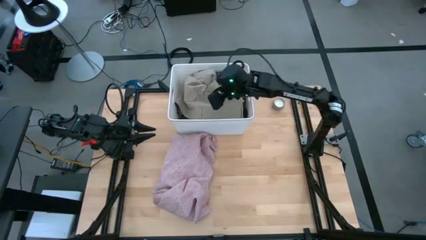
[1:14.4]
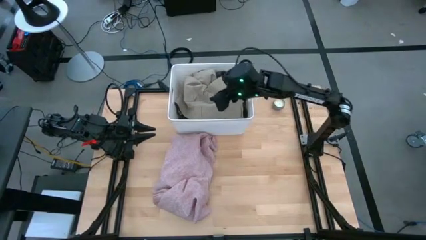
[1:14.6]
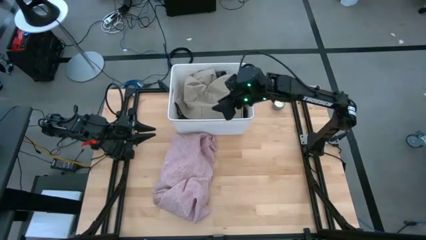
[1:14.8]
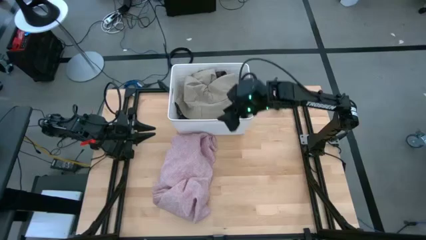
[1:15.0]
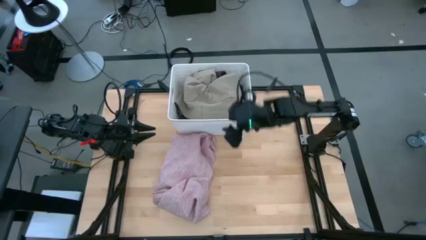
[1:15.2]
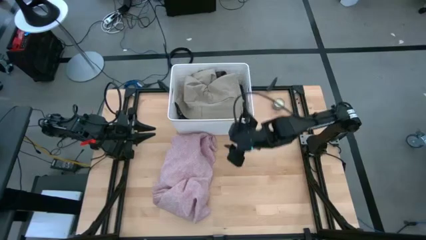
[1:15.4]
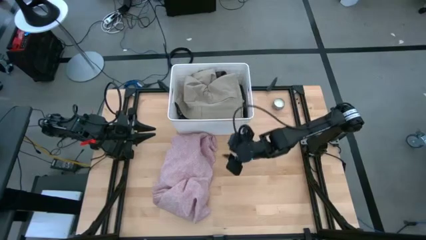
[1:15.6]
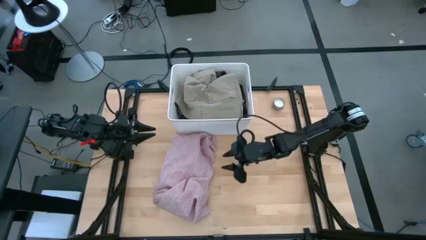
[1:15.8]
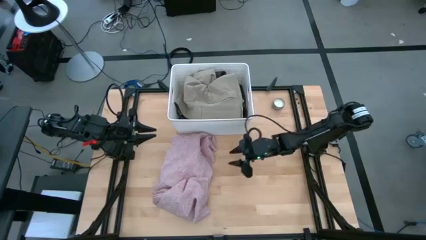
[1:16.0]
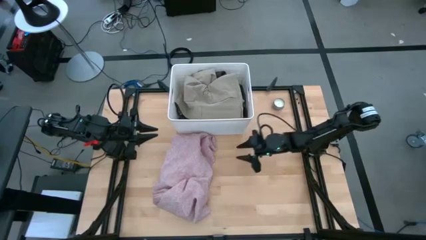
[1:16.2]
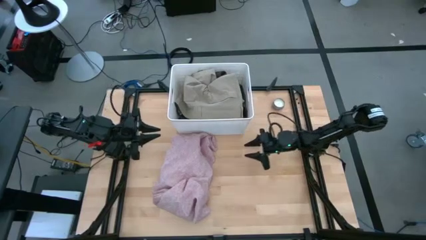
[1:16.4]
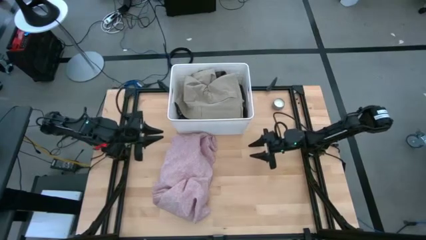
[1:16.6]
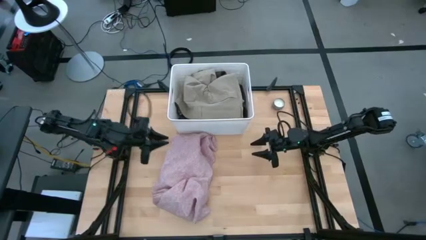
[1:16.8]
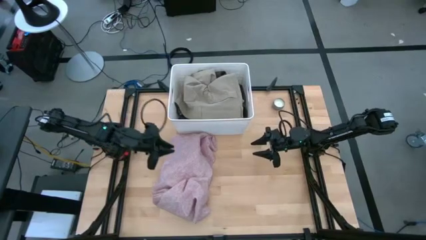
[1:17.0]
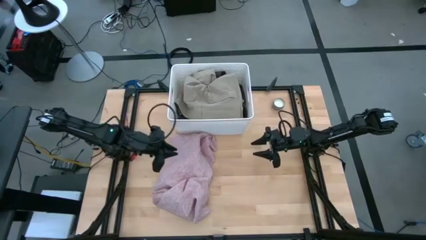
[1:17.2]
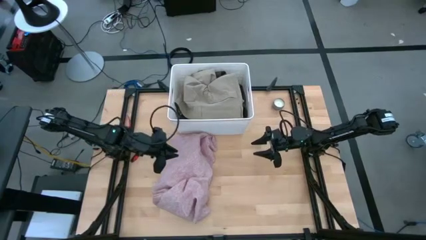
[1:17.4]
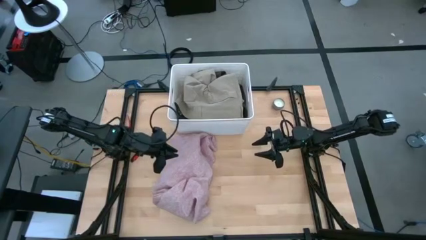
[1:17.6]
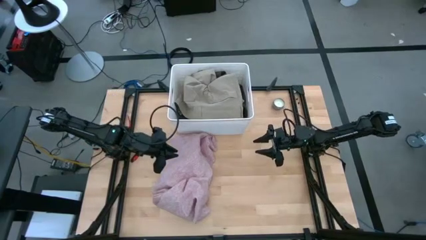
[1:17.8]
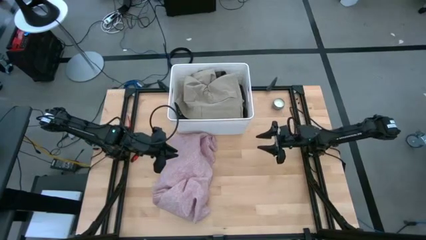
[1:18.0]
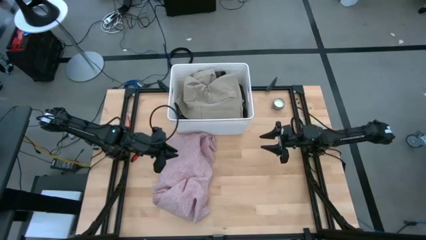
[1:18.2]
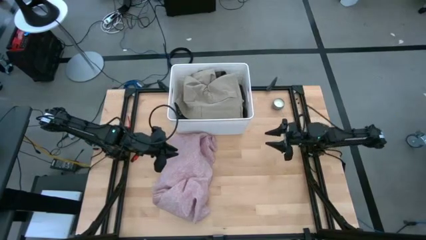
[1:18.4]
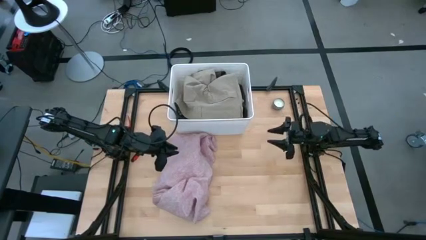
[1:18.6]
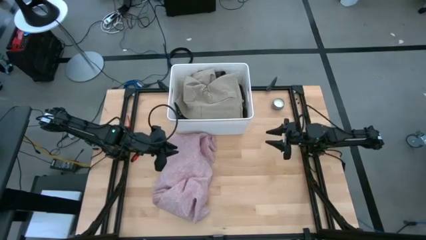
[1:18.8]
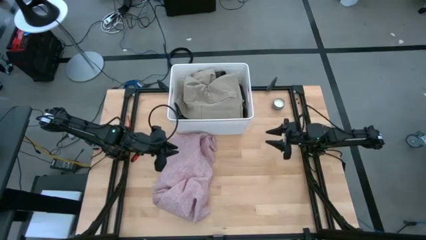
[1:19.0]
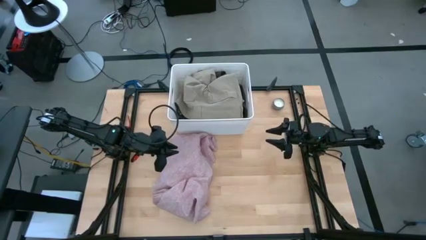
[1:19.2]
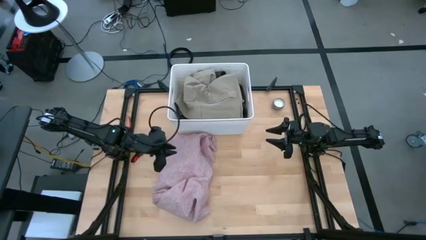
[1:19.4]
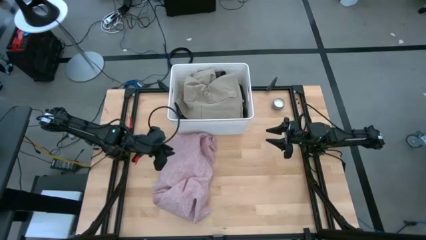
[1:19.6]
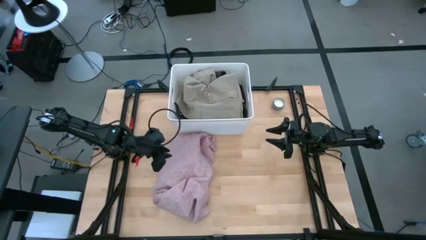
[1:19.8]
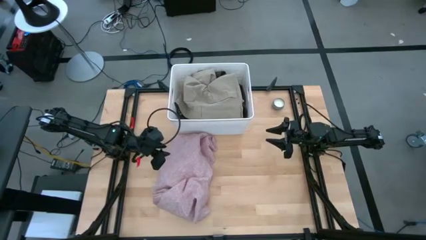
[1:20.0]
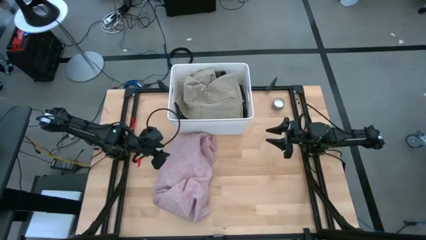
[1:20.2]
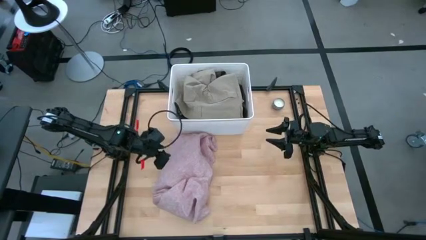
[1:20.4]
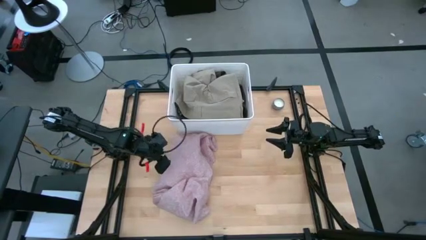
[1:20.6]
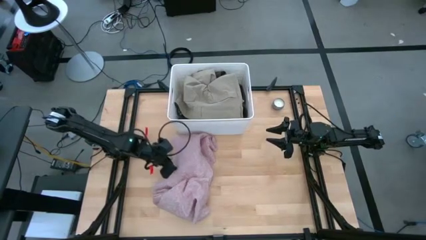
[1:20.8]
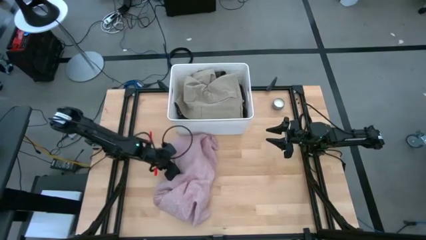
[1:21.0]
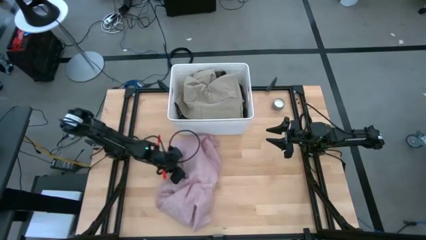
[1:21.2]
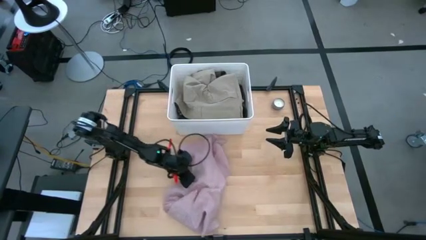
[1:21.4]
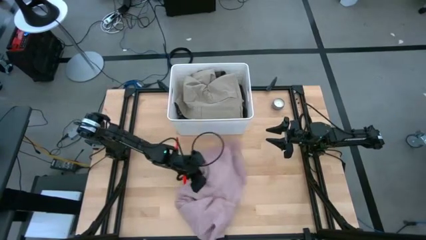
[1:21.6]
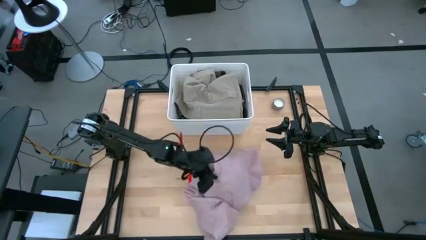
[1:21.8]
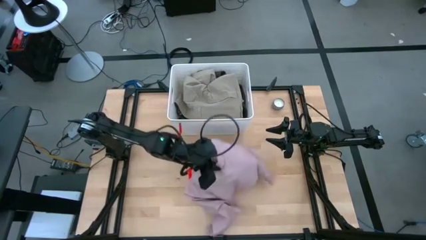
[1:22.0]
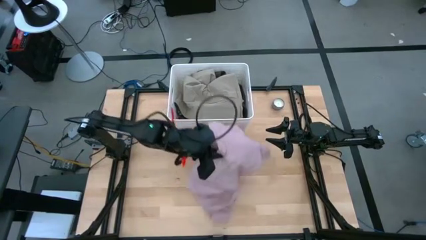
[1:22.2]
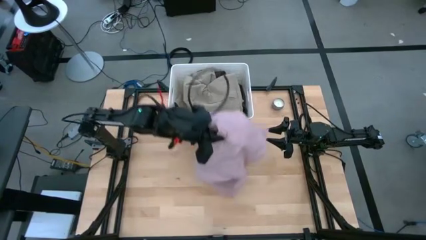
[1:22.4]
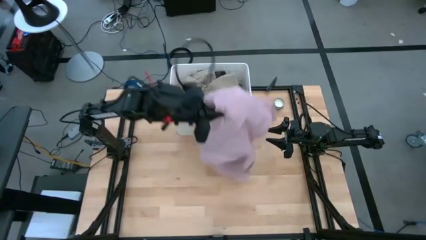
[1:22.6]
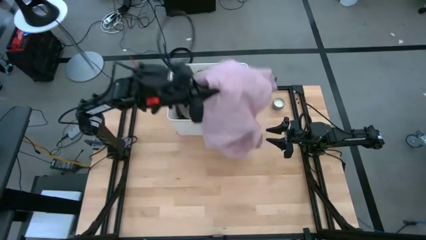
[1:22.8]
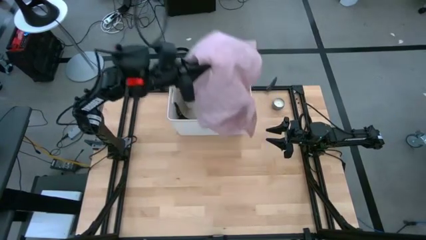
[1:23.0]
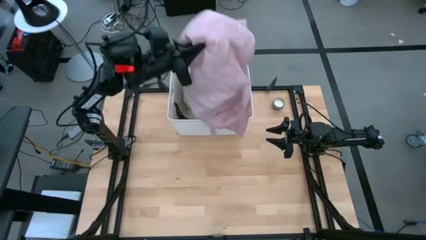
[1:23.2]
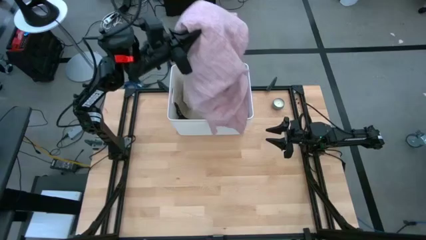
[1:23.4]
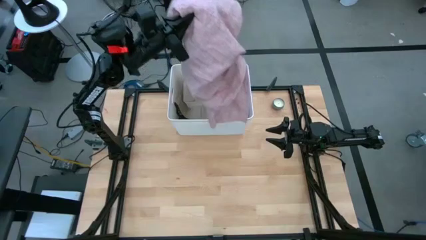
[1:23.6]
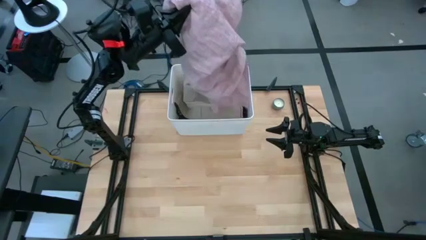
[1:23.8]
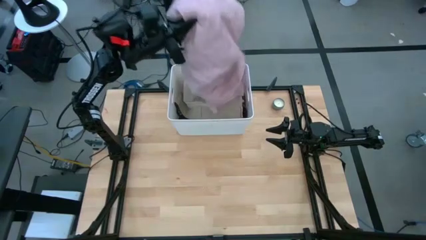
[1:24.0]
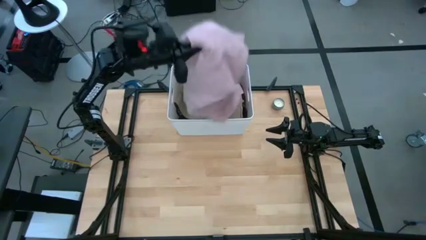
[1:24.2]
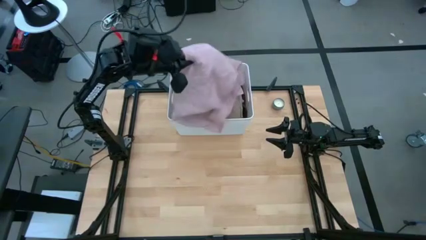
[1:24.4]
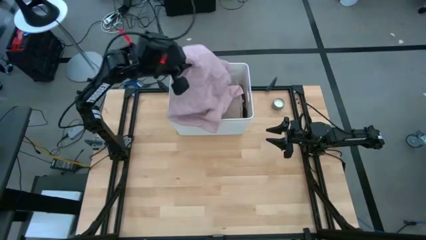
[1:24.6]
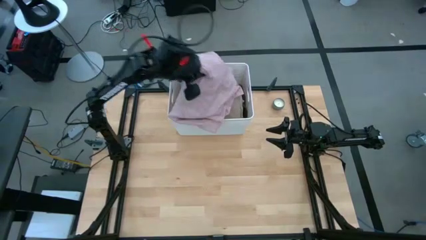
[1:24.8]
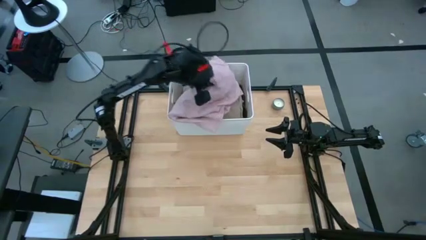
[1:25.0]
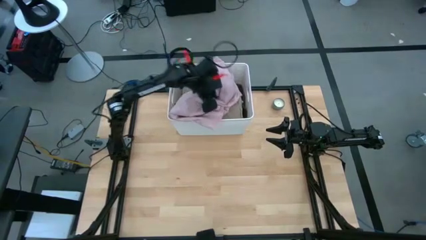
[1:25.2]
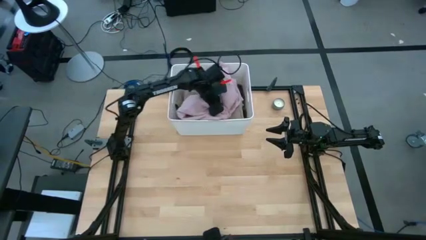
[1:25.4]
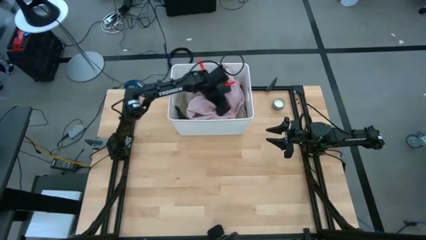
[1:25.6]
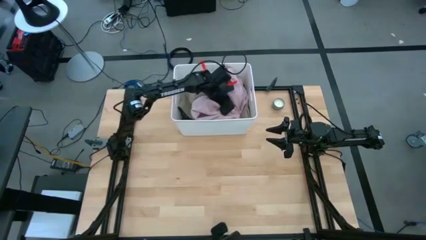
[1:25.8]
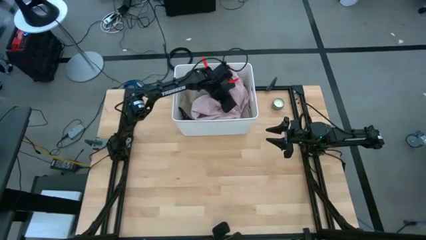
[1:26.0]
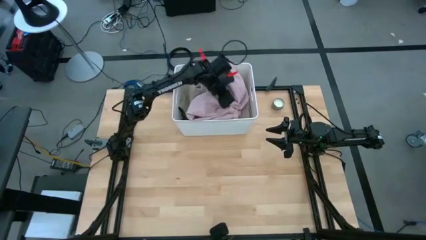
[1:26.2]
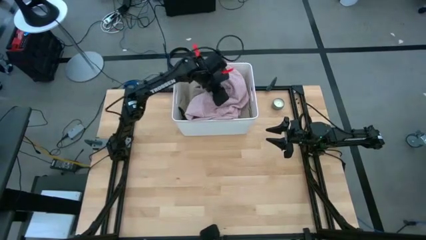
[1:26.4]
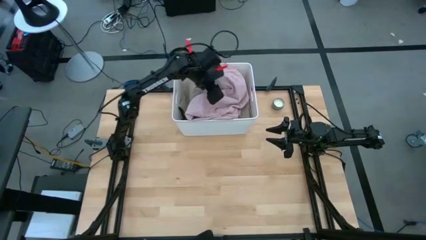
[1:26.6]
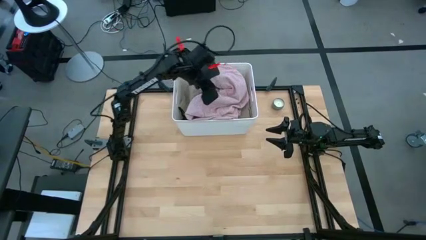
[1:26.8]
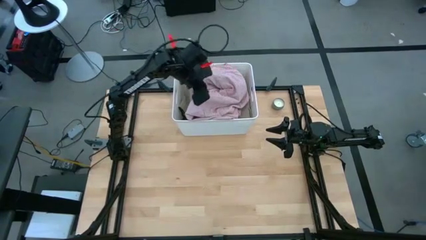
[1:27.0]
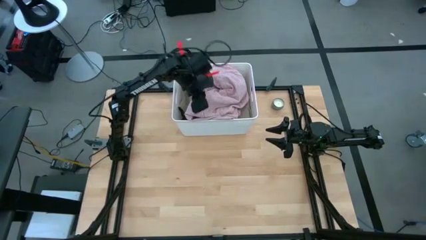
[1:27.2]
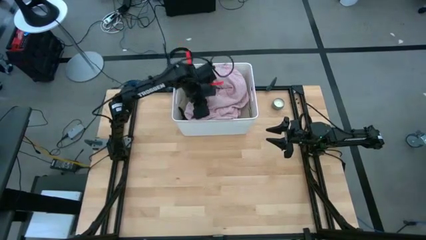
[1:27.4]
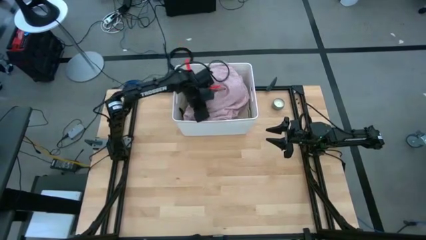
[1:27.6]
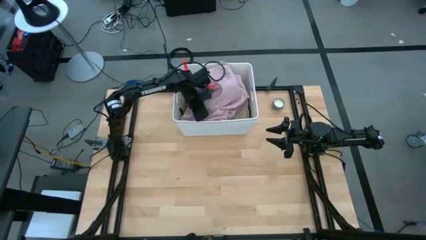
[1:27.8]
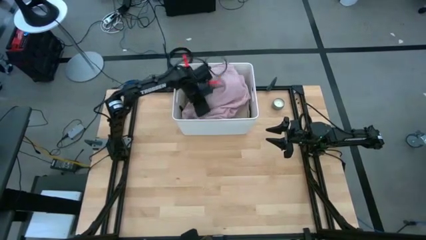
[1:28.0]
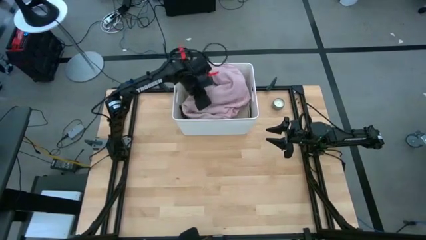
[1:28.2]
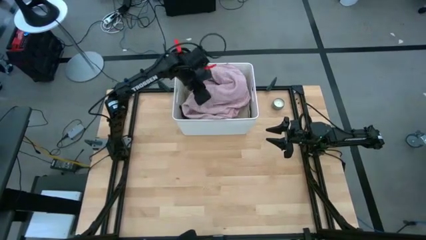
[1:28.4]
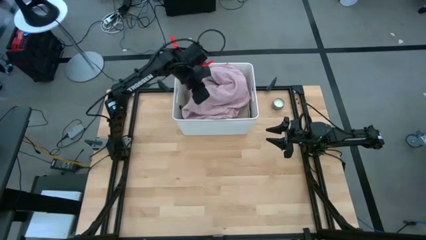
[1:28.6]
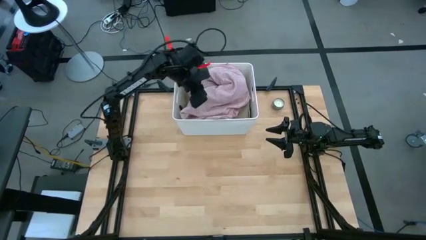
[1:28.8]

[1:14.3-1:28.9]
Task: Sort clothes
Put the pink shirt into the white laundry organizer

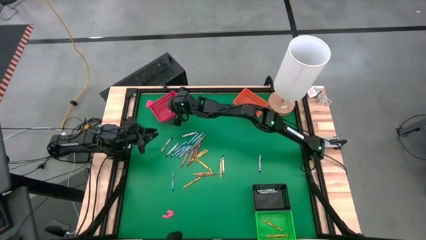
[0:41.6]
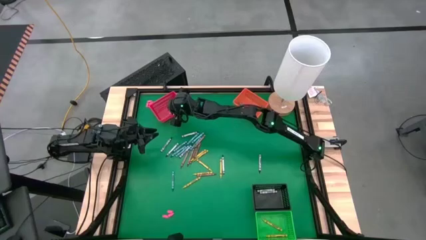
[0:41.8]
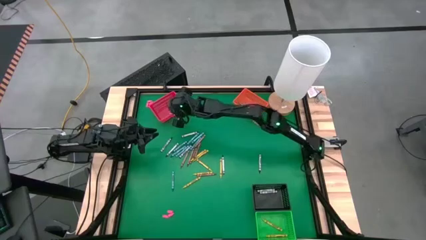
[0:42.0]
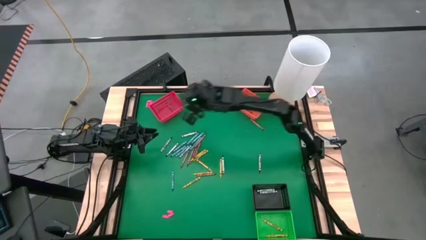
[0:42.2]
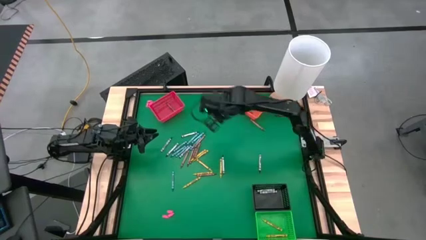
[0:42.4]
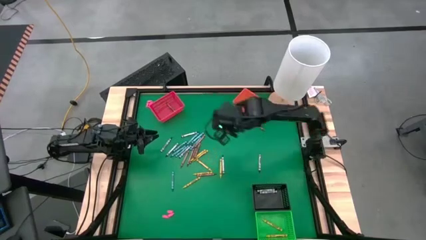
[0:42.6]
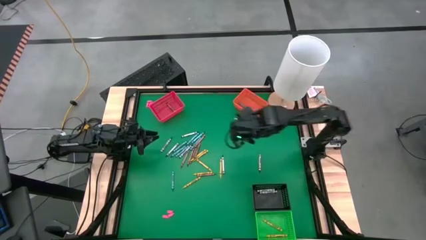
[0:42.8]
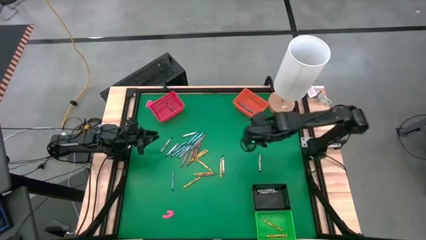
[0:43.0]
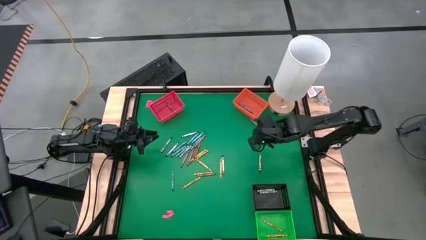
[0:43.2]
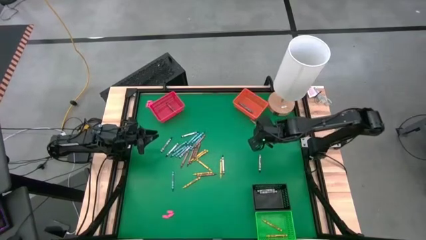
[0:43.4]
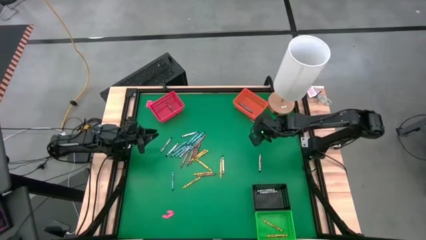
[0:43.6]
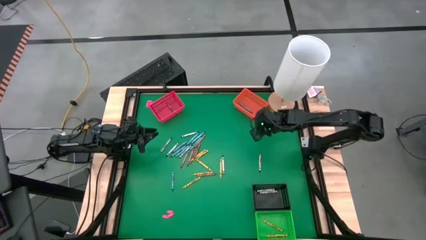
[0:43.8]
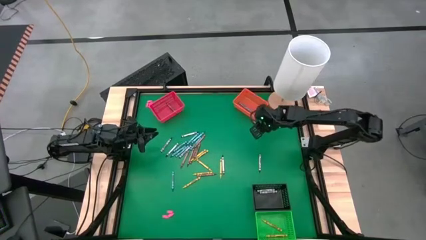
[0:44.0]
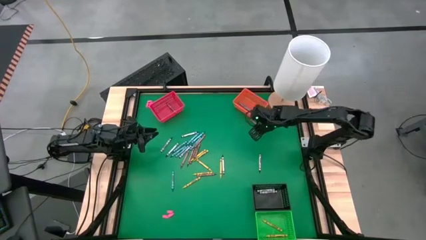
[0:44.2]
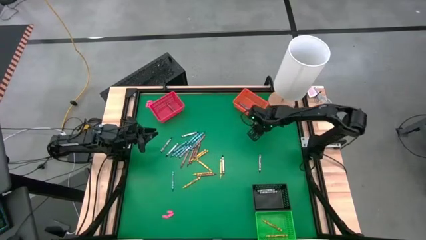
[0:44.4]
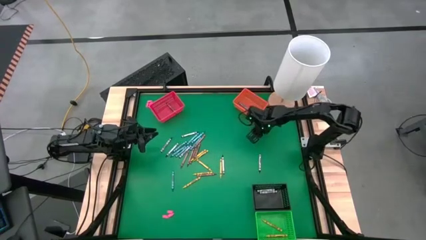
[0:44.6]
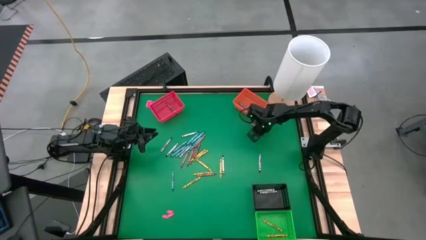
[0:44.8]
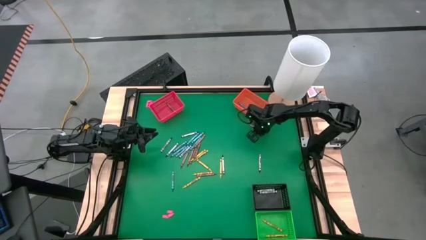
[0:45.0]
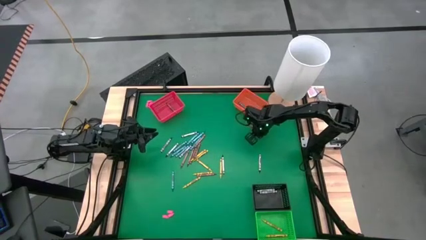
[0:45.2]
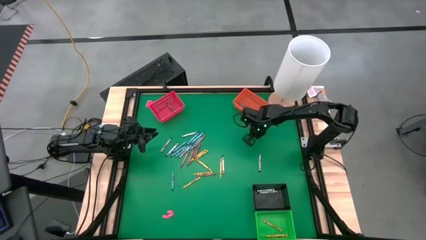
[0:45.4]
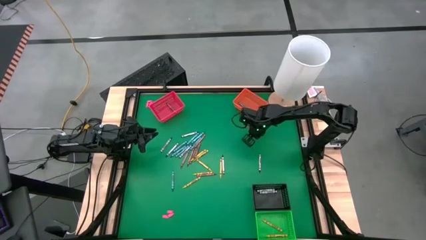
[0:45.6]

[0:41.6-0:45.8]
Task: Sort crayons
Put the brown crayon into the red bin
